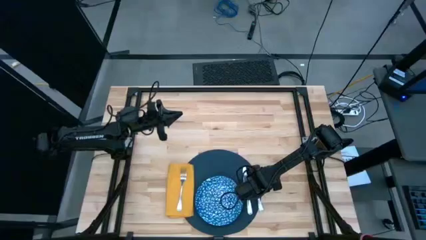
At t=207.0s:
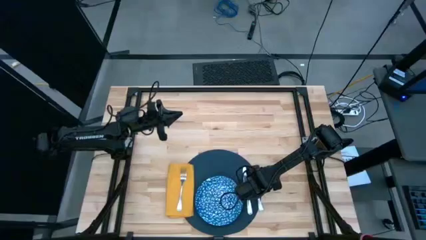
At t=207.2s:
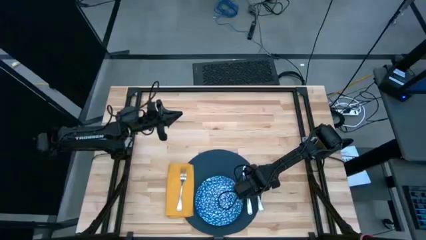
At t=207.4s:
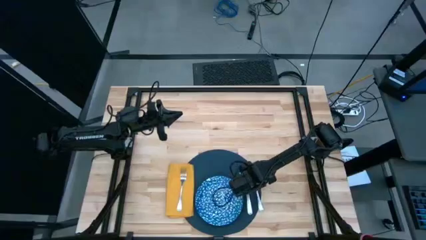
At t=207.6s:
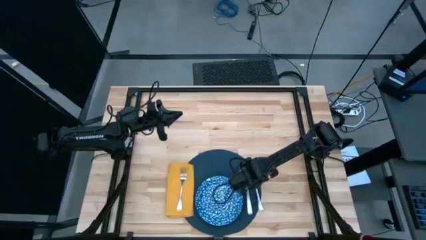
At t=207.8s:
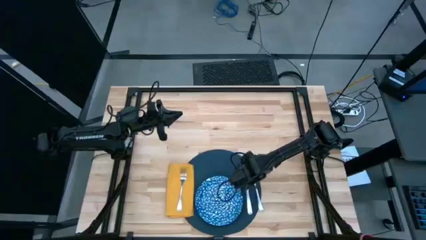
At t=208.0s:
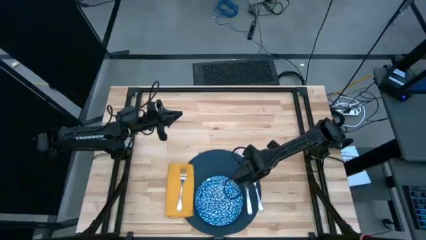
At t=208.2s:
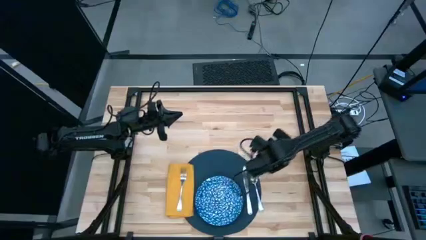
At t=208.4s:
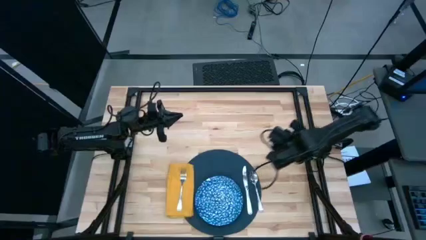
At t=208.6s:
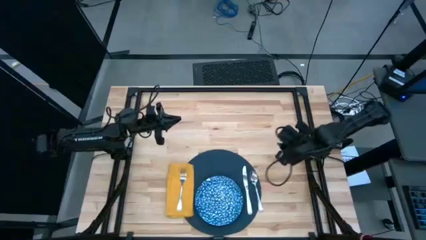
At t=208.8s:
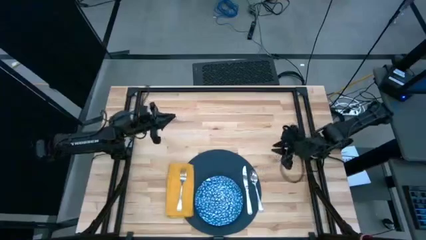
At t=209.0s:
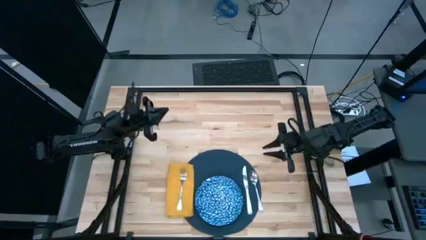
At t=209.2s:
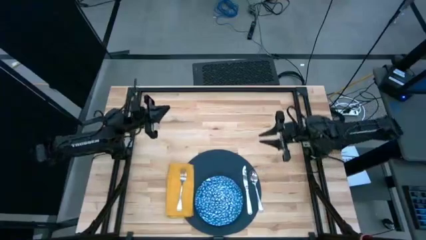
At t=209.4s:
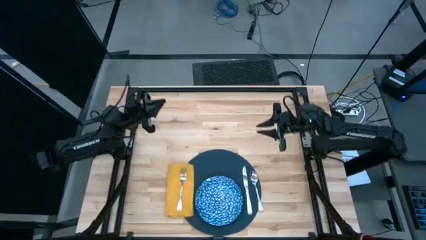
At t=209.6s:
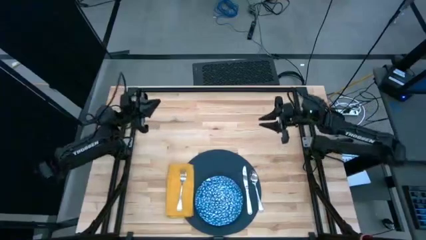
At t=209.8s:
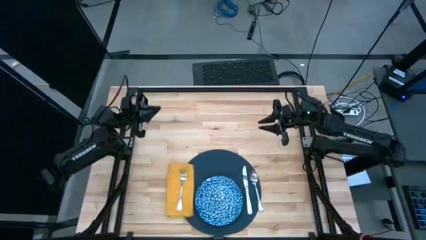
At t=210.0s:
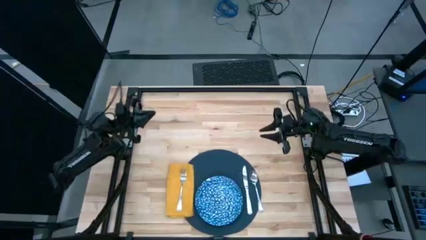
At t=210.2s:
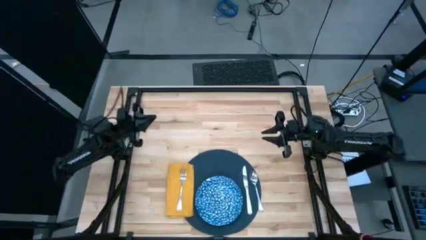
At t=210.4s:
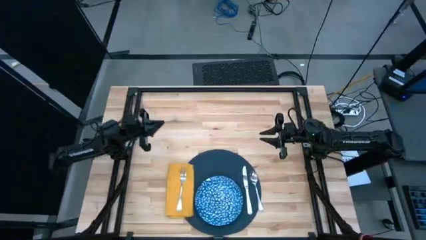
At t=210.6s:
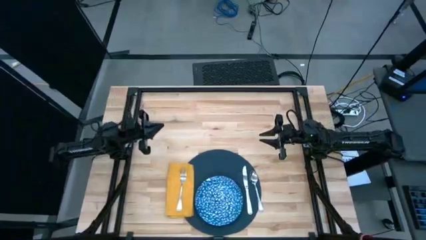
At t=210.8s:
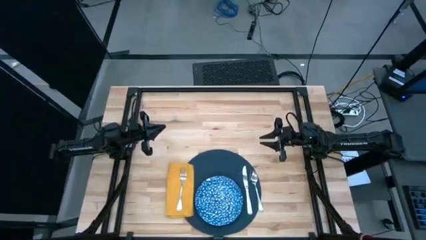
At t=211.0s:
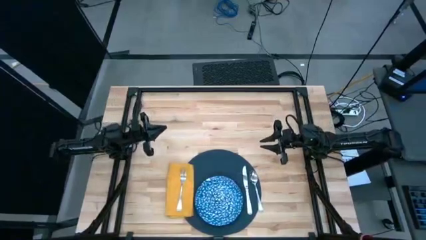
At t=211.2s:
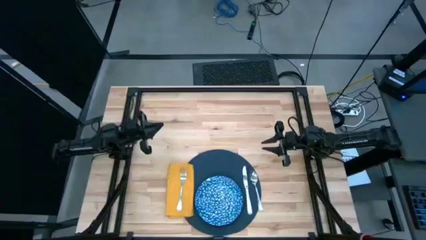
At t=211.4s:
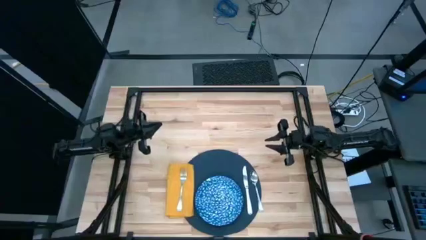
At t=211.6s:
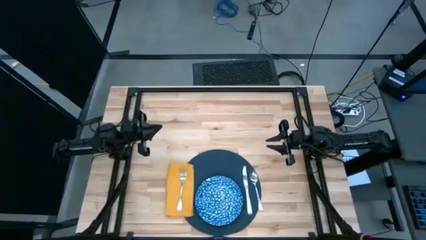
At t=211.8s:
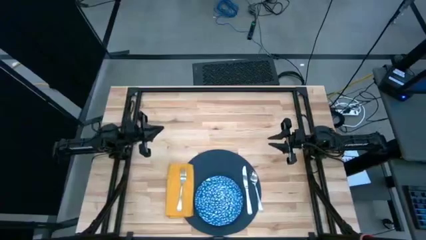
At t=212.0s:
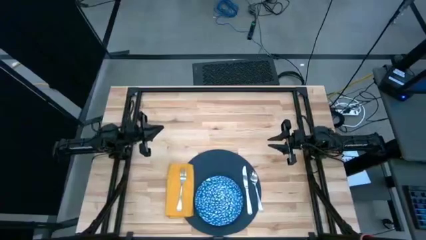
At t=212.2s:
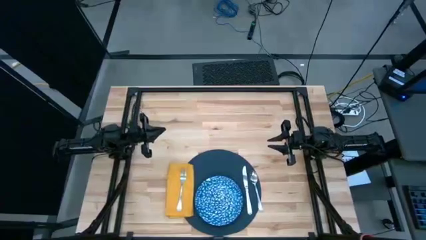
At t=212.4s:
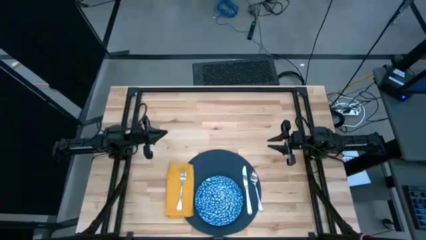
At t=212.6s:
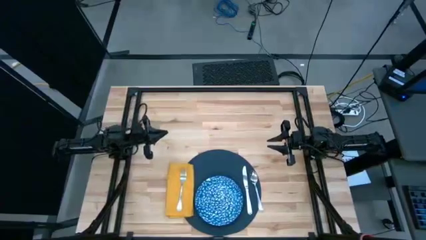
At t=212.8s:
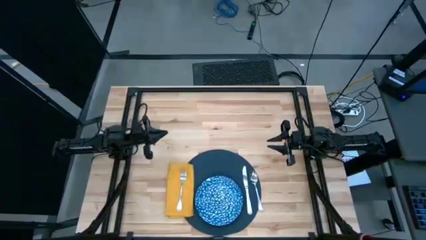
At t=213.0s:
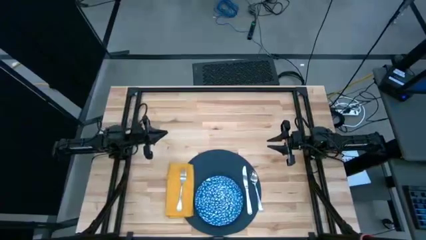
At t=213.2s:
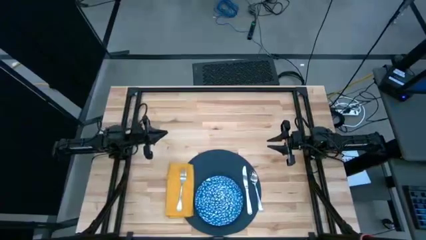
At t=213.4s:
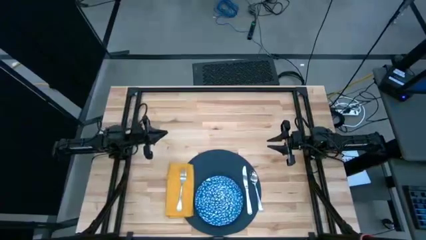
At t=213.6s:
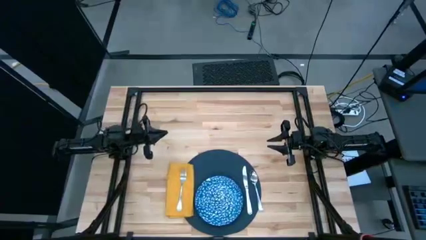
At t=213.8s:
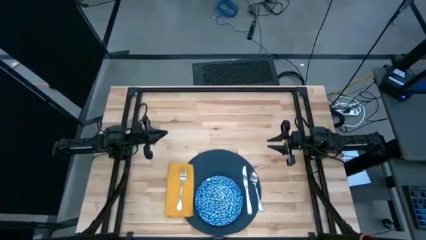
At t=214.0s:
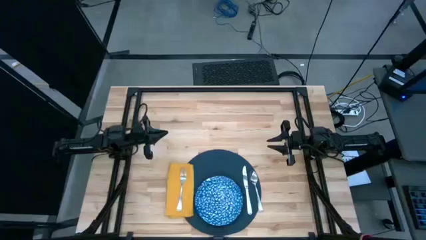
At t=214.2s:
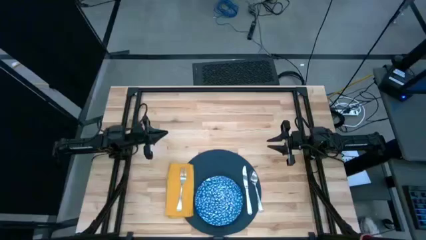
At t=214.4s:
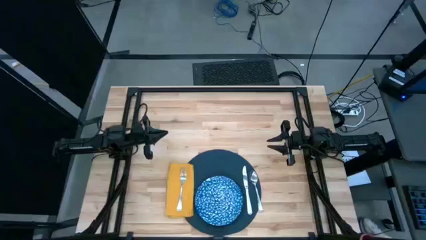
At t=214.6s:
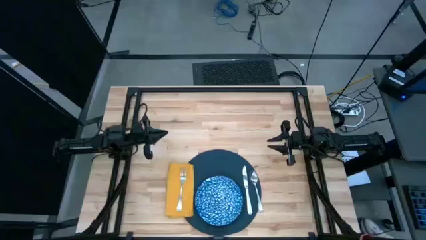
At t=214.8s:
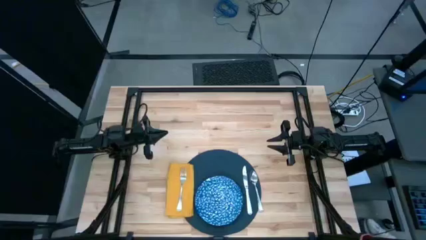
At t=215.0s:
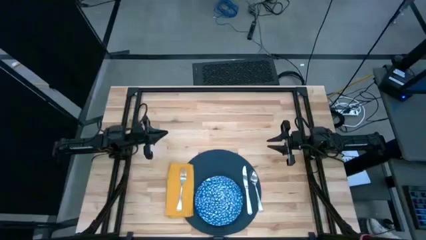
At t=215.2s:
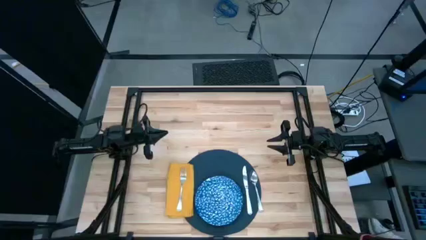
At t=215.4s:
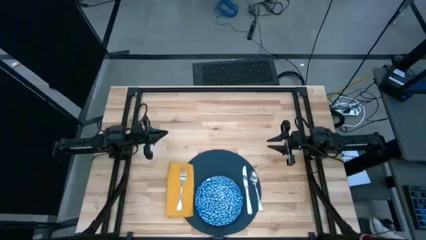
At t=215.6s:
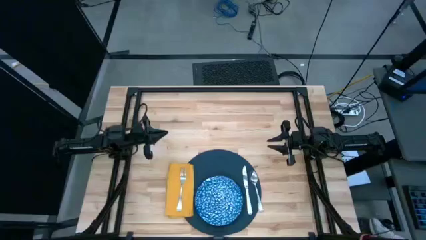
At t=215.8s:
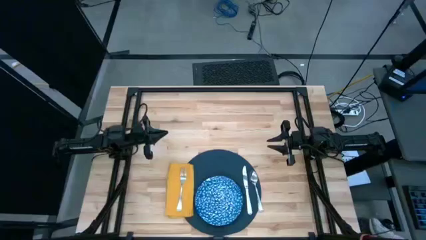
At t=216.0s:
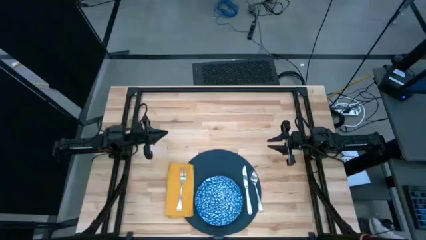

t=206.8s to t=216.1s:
Task: Set table place
Return to Home Position

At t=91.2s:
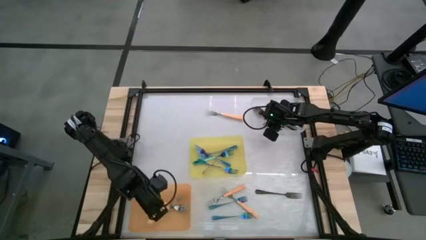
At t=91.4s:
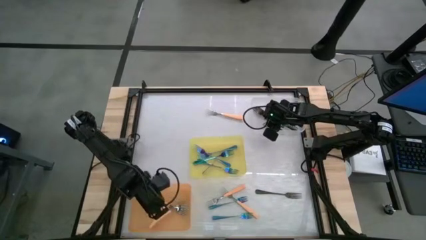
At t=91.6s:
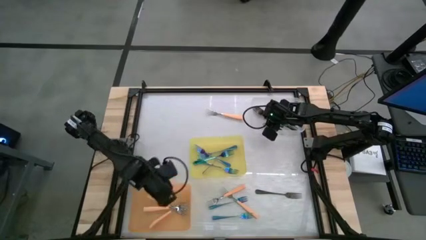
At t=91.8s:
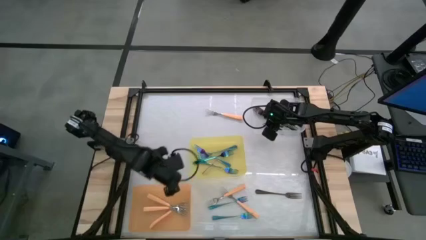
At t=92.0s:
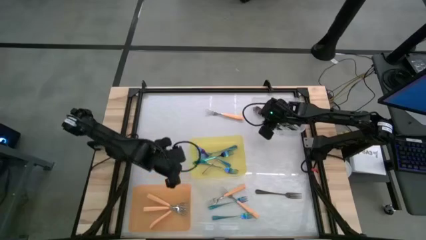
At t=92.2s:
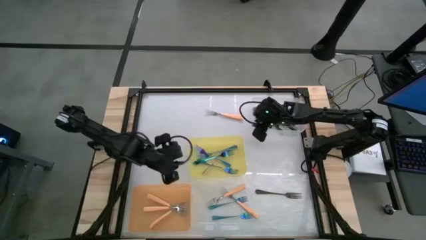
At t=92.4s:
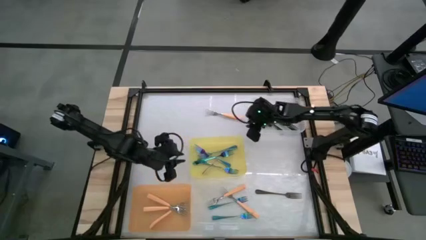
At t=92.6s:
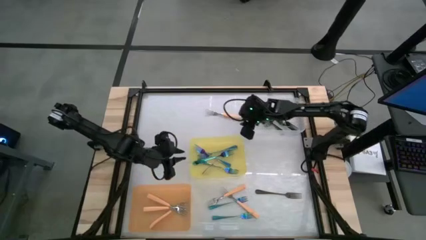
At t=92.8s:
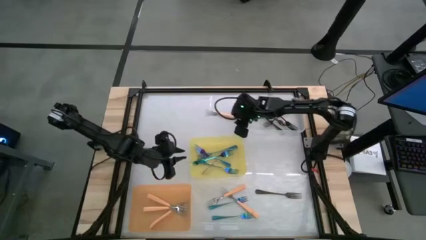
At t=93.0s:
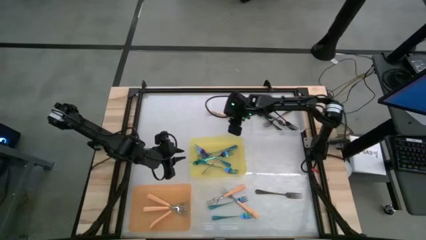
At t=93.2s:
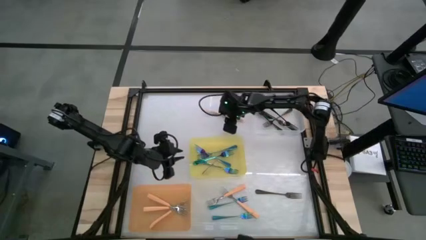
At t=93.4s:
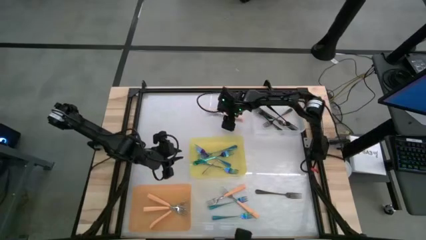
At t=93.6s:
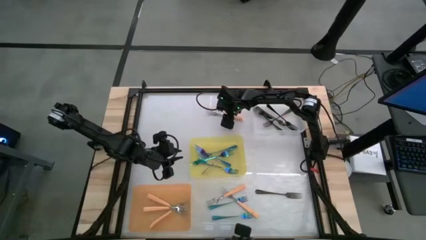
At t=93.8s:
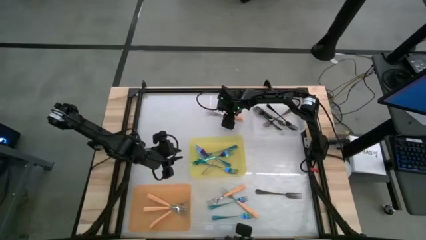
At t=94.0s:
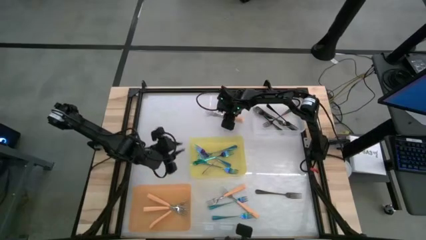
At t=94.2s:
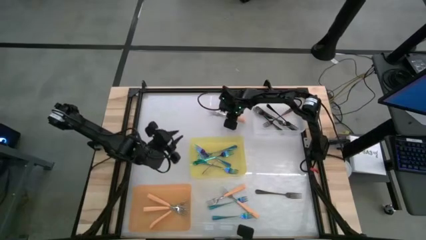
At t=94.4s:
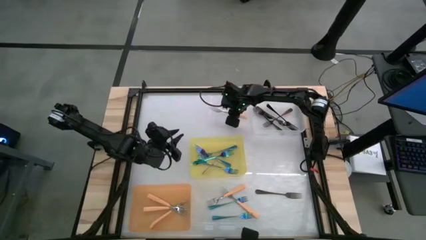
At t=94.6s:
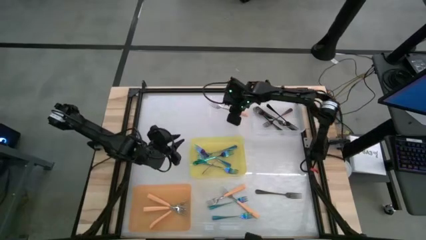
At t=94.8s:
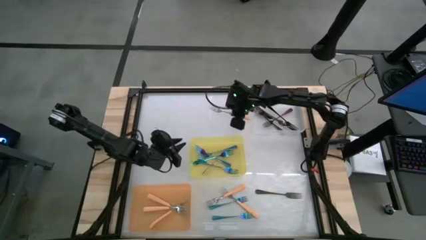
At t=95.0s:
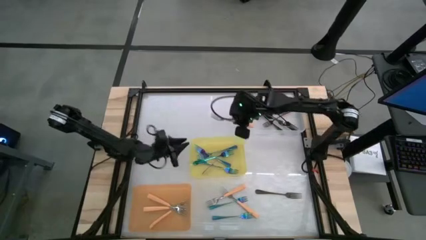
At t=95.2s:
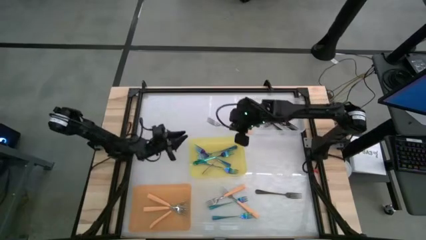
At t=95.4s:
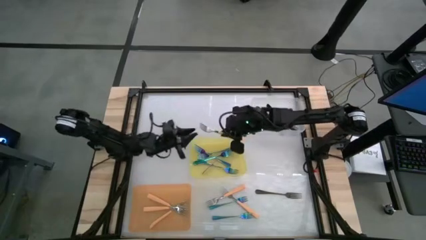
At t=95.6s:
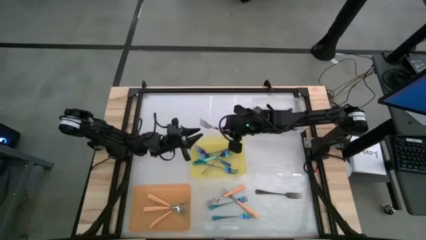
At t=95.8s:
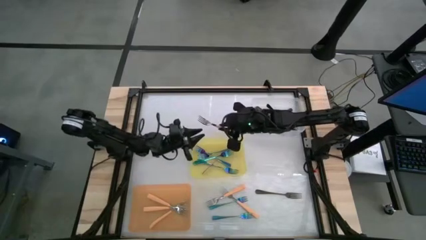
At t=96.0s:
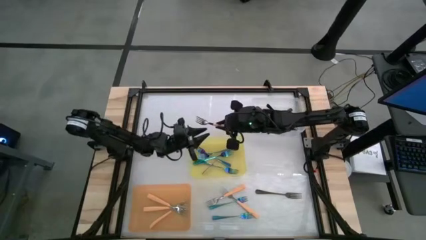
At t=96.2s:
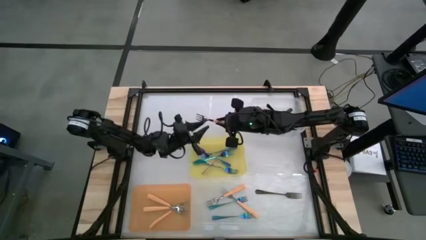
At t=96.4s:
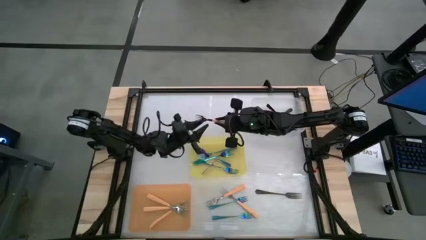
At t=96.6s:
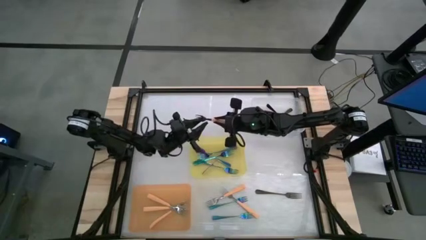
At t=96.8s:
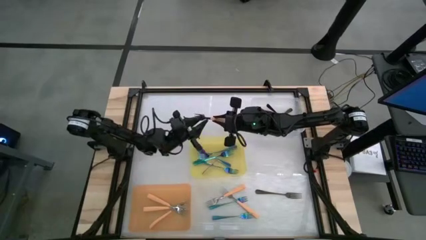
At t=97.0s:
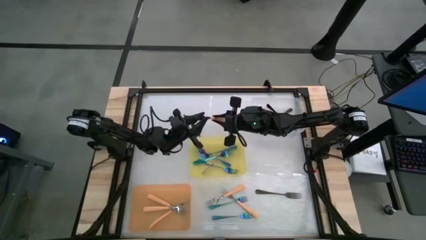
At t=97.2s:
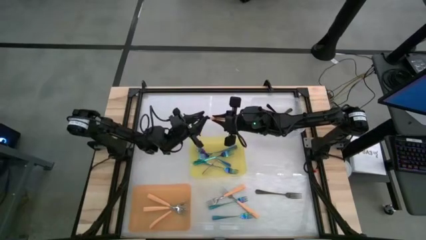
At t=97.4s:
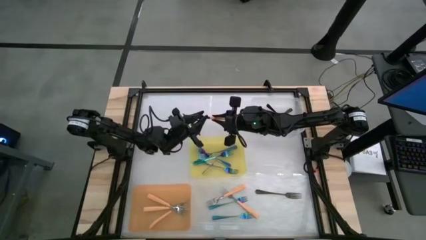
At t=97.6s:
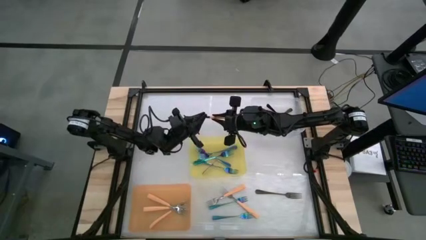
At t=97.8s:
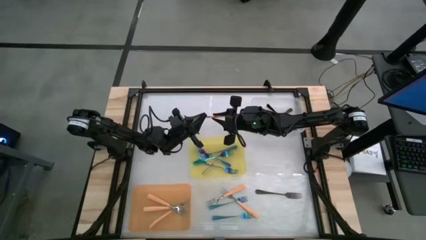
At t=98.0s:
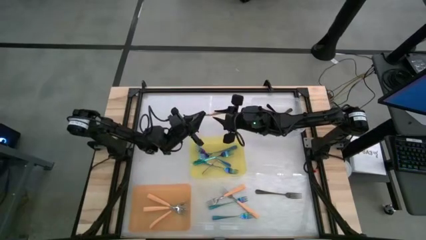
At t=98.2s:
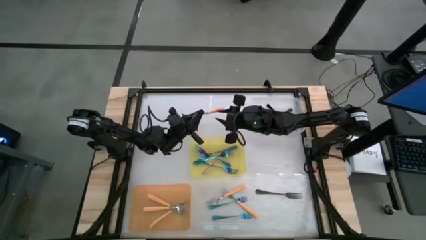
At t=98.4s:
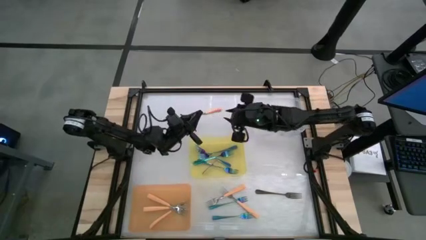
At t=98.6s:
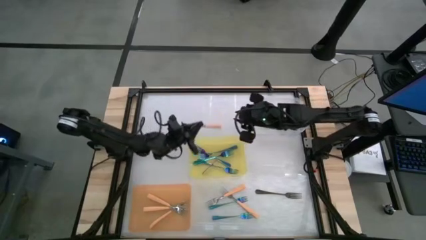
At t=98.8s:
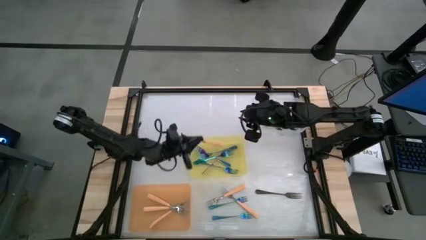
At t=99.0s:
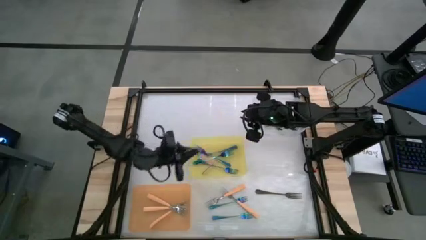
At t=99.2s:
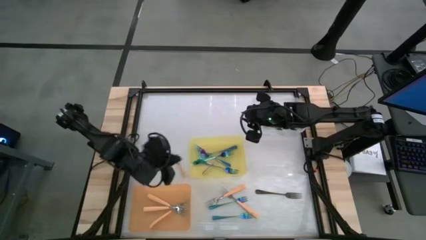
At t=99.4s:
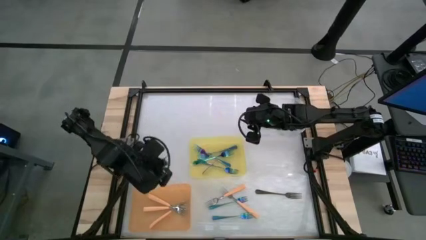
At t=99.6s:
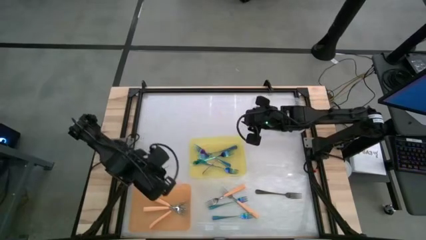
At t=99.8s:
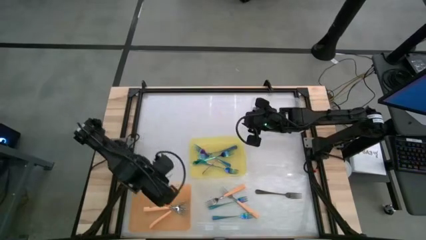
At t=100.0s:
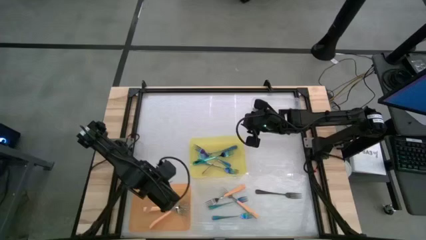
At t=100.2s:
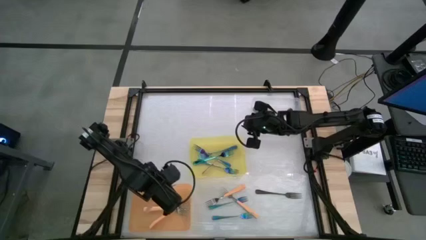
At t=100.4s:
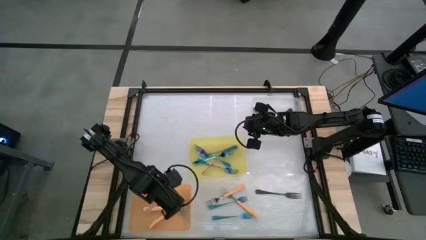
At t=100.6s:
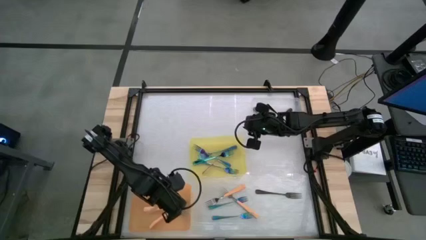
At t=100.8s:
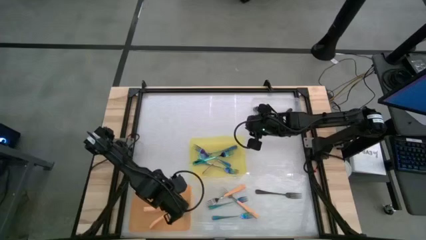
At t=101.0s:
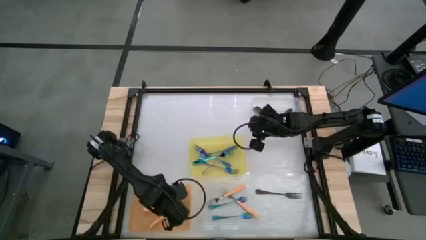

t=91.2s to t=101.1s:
Task: Sort silverware by color (type)
Put the orange fork into the orange bin
